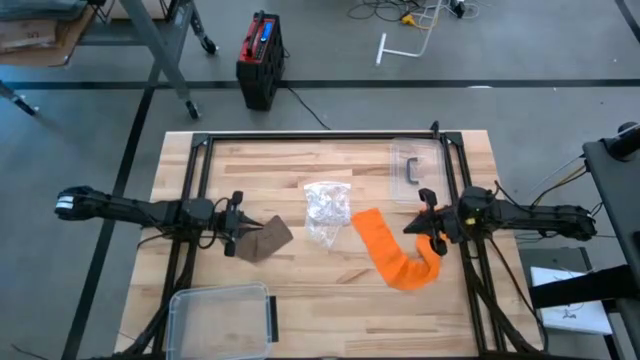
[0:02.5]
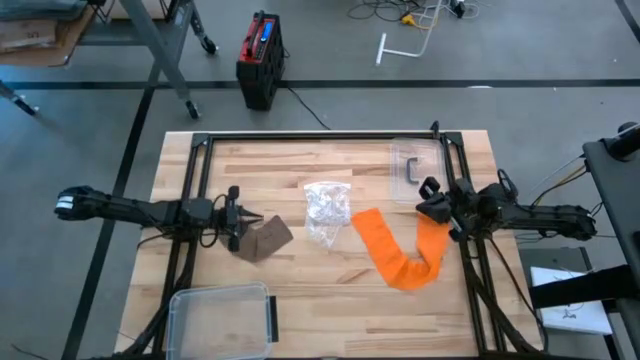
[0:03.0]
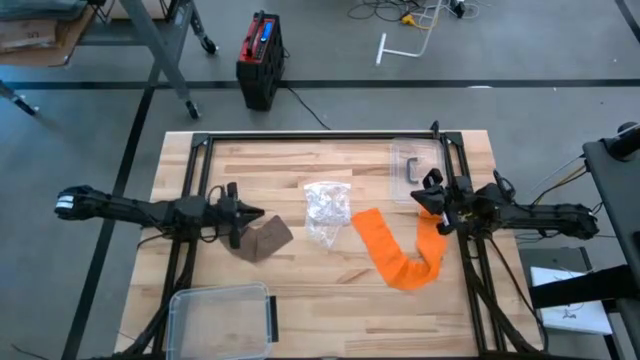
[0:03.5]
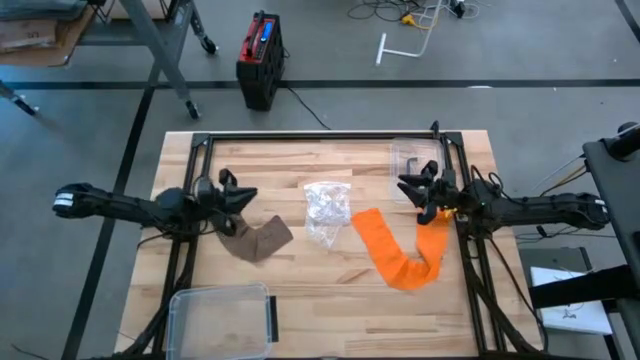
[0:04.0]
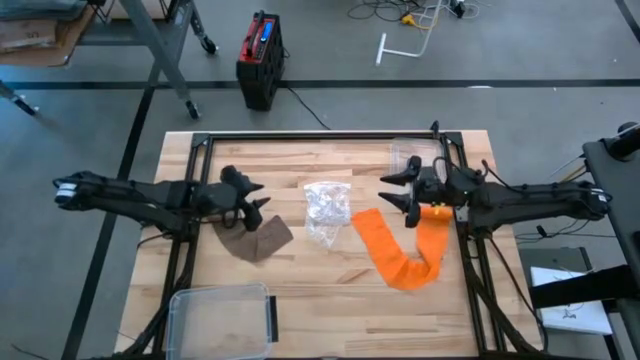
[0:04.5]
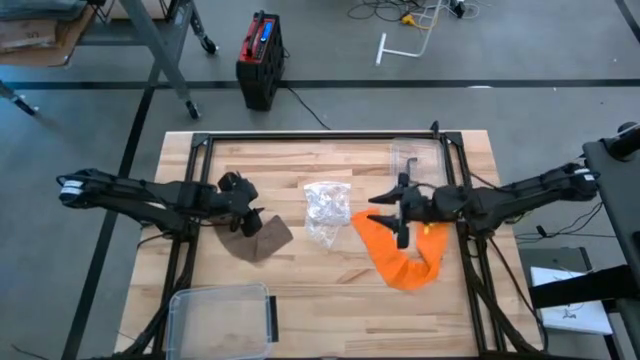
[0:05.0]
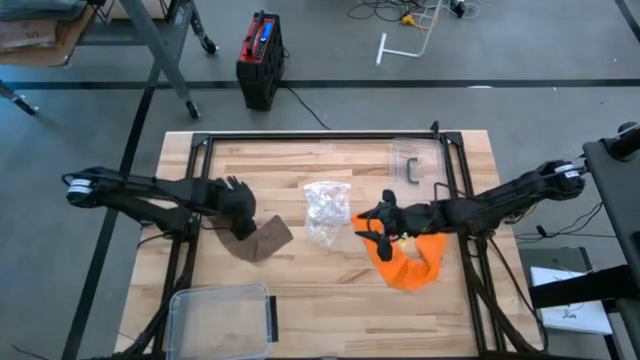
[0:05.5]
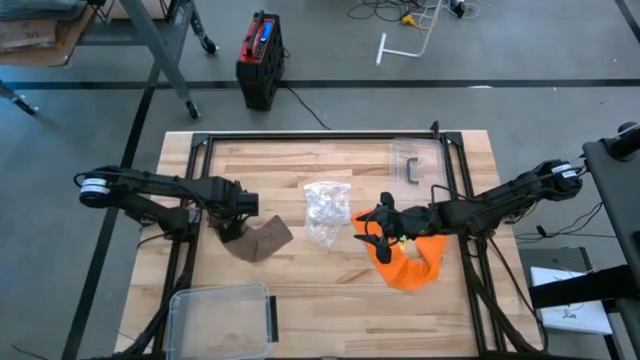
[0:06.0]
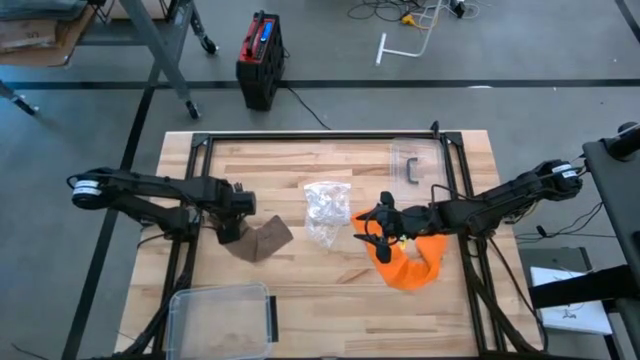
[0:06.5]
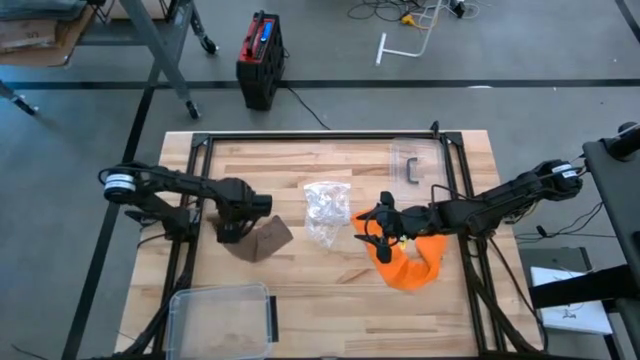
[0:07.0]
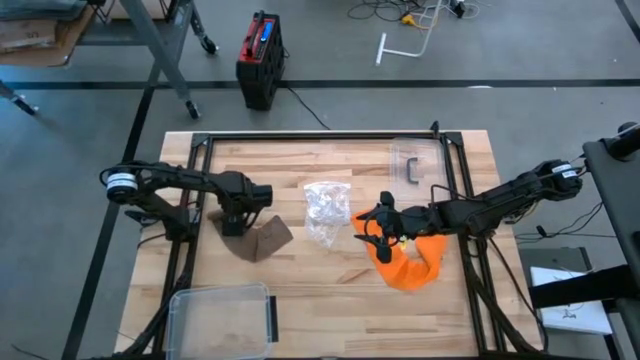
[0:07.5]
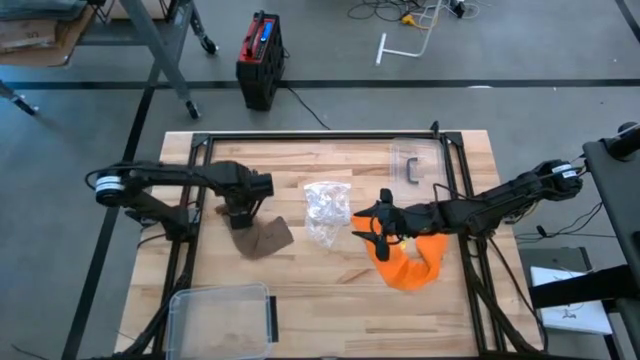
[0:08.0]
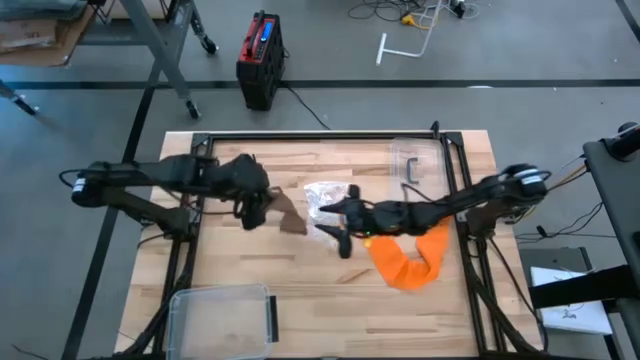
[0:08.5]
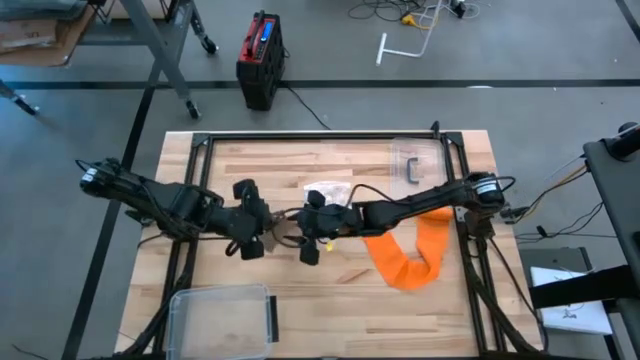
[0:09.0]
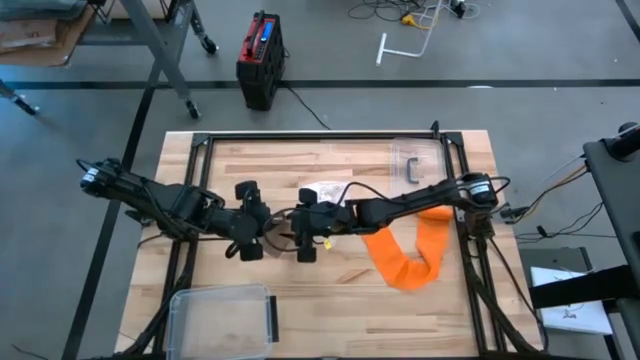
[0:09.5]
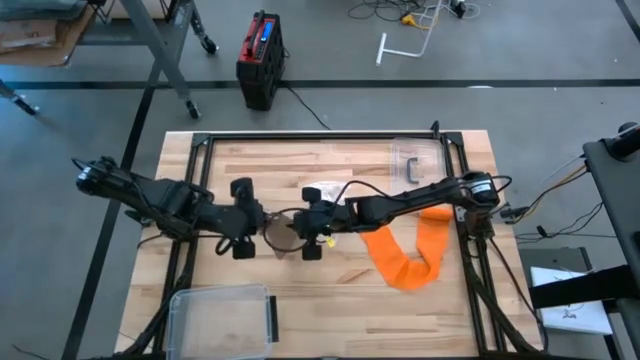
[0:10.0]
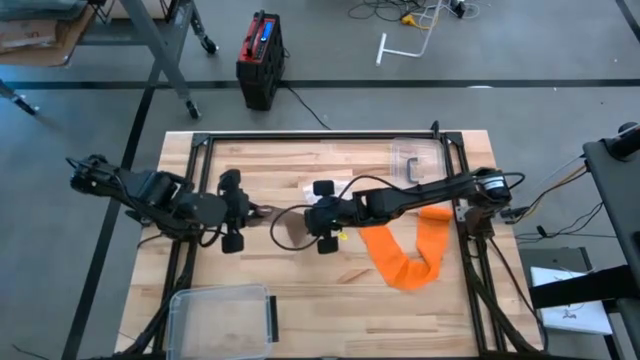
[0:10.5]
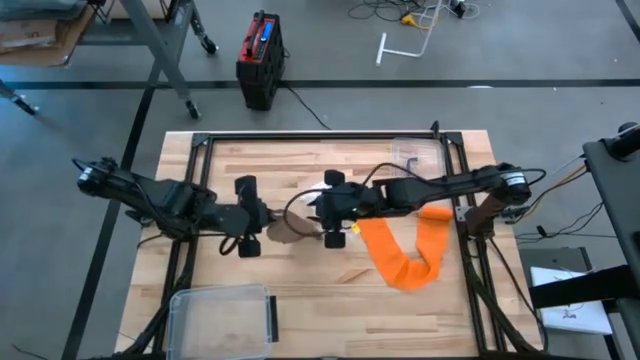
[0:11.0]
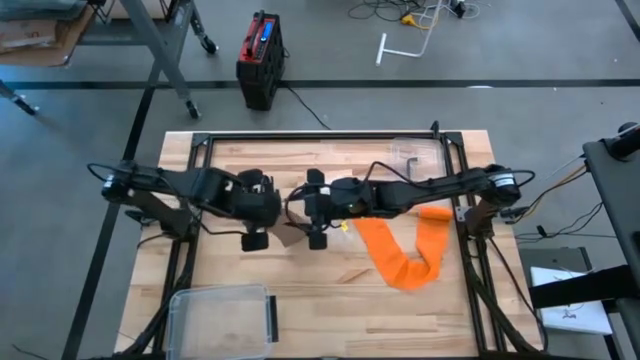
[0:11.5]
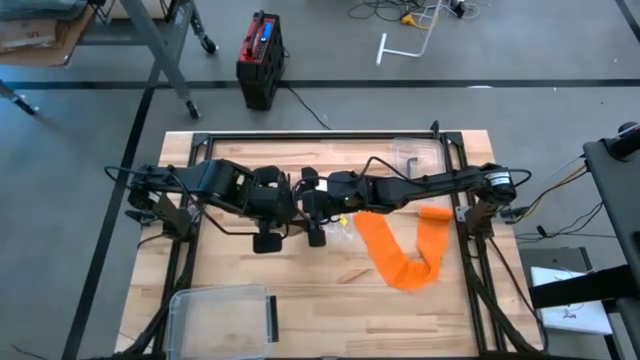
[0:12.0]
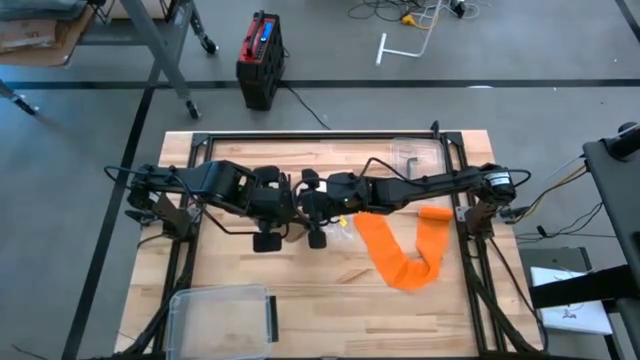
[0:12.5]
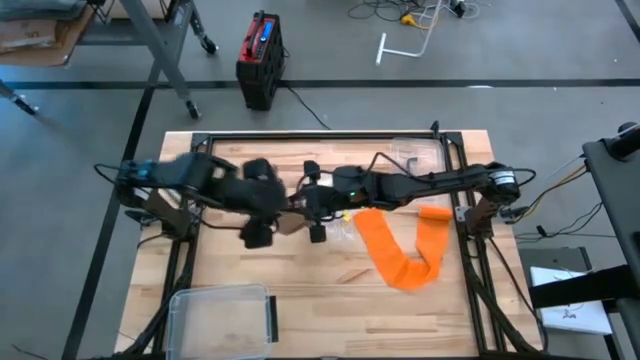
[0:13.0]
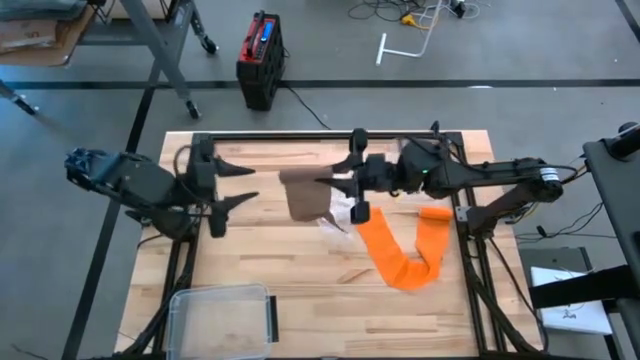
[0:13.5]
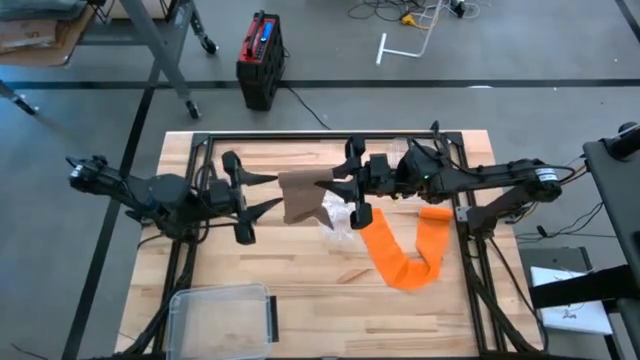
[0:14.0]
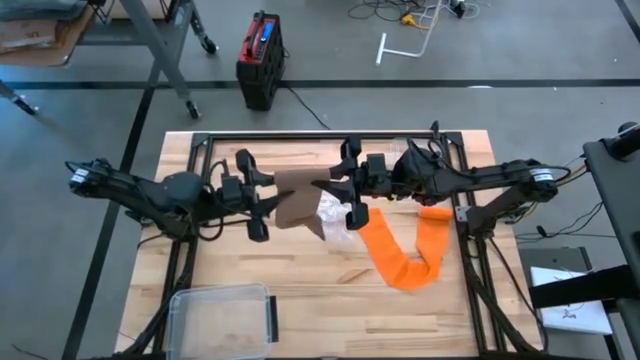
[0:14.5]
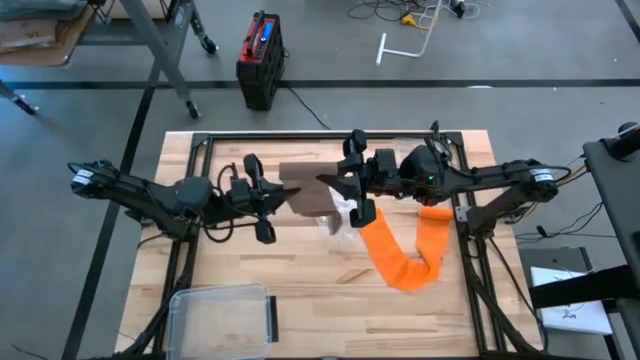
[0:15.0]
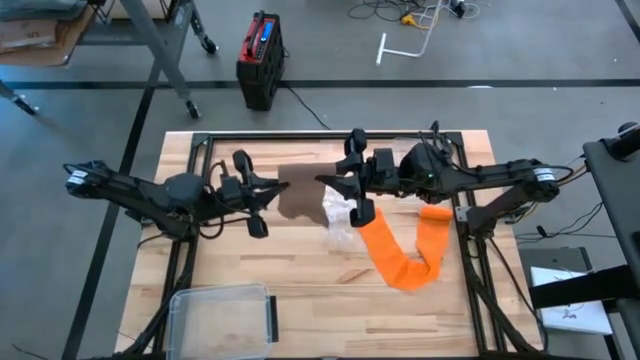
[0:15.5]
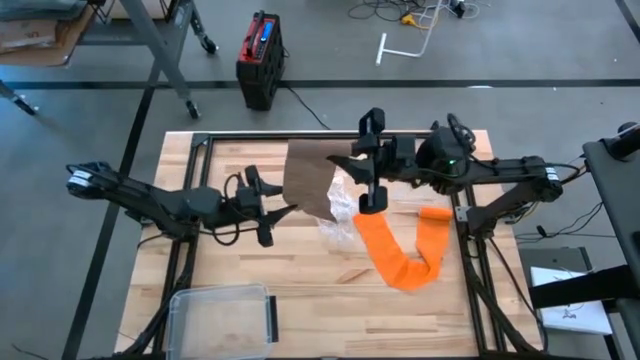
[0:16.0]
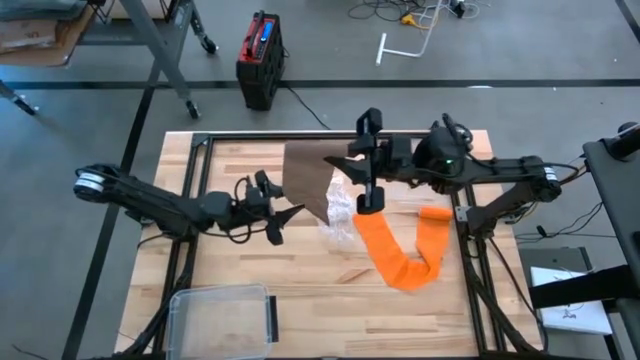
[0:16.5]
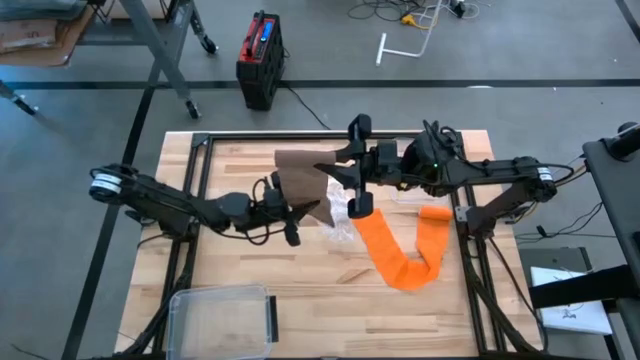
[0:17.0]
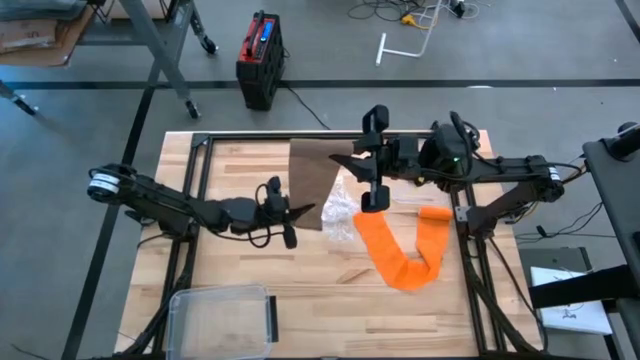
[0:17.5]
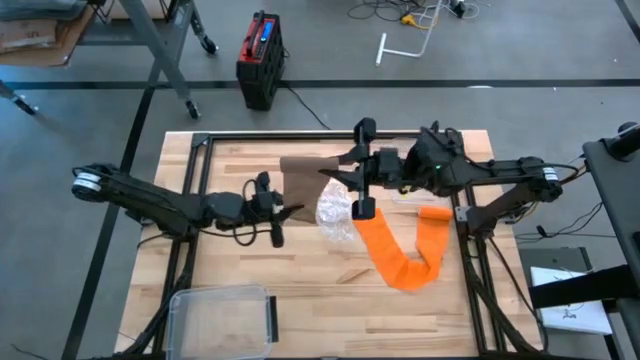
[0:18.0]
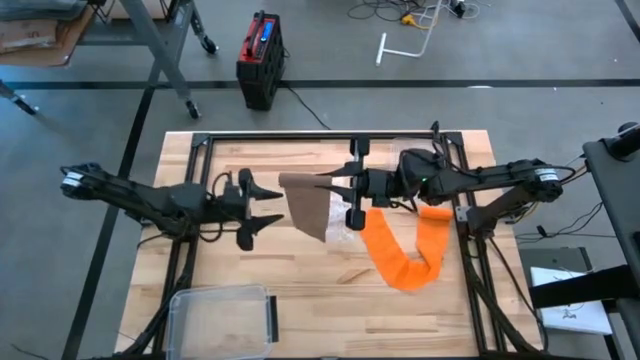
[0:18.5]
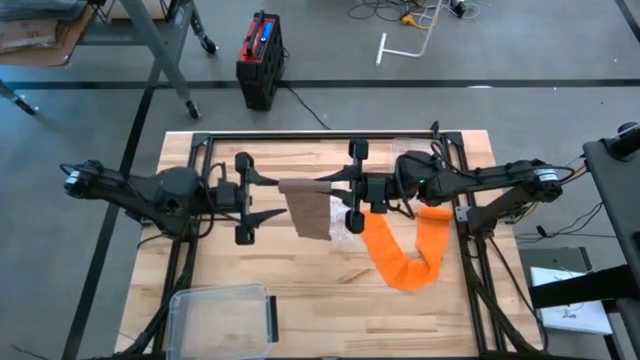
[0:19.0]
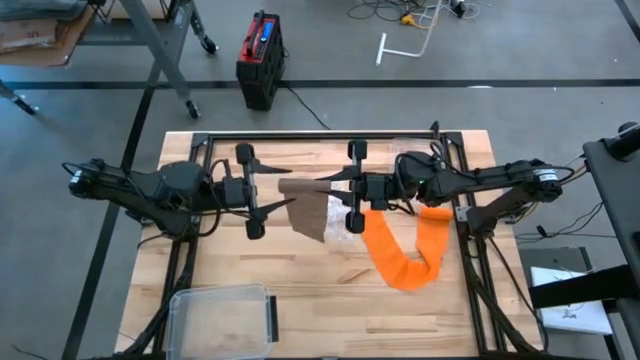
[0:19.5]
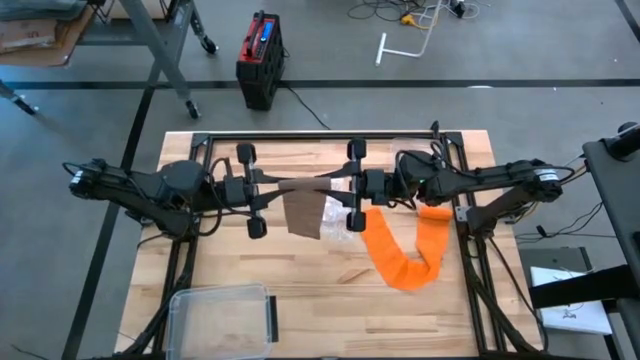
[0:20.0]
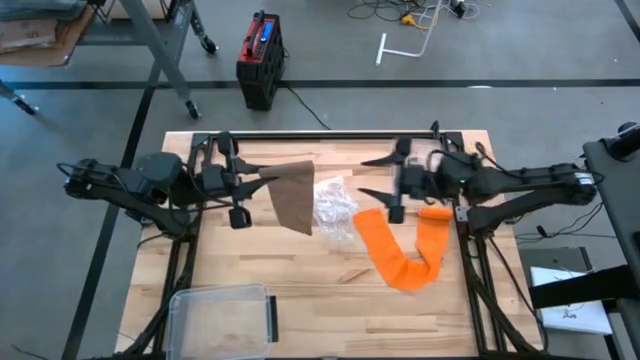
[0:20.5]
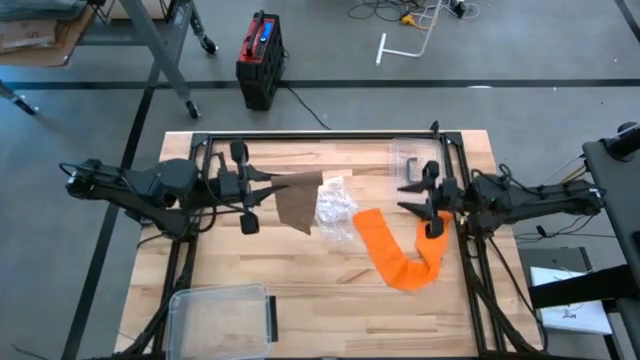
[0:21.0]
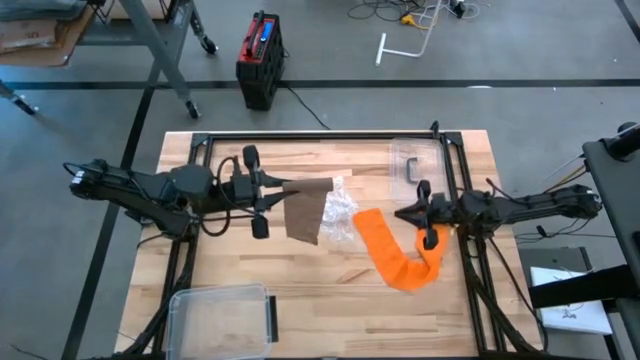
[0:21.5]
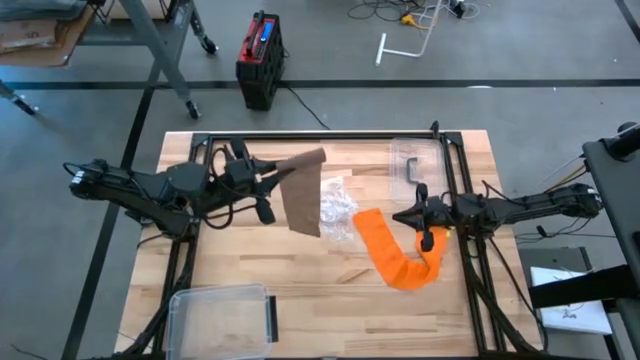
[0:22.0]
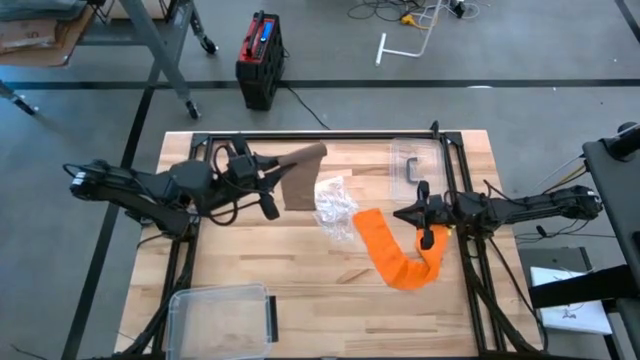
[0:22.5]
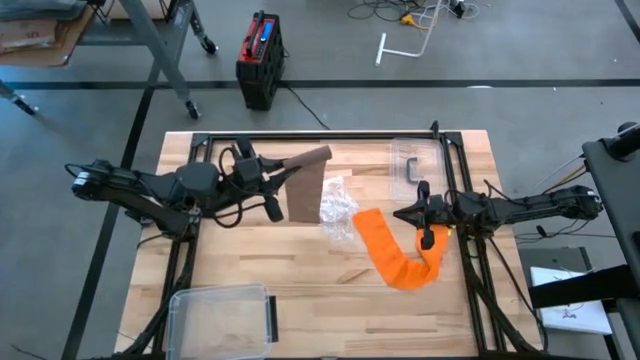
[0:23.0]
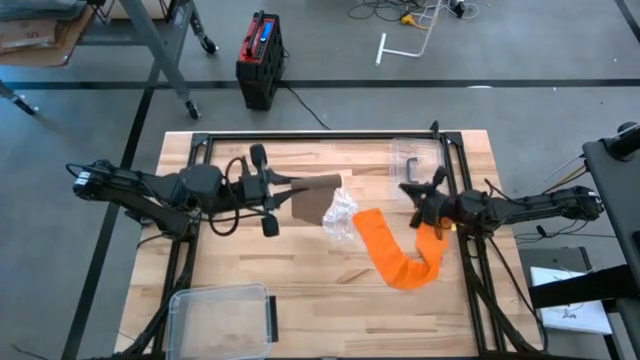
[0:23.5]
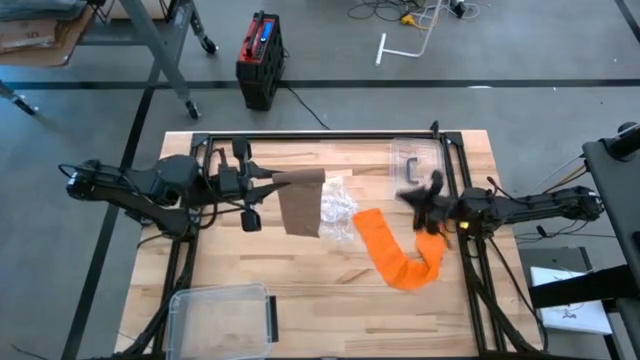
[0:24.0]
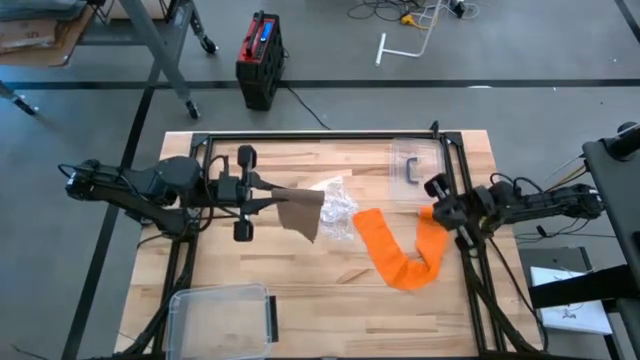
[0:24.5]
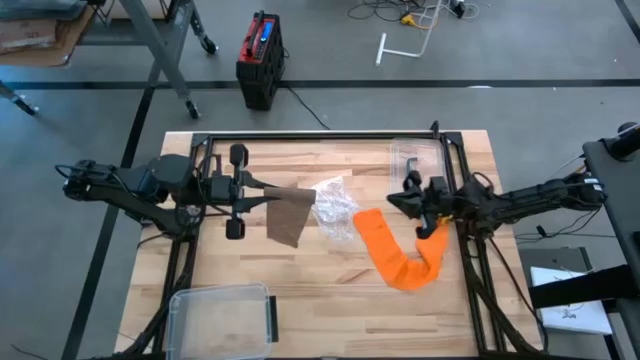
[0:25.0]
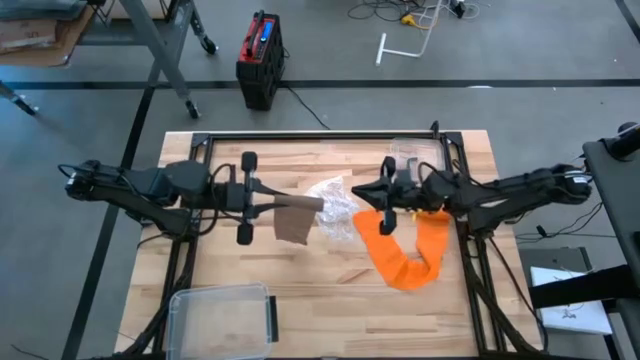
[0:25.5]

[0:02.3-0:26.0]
Task: Roll bandage
Roll the brown bandage
